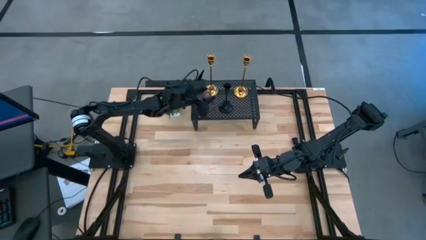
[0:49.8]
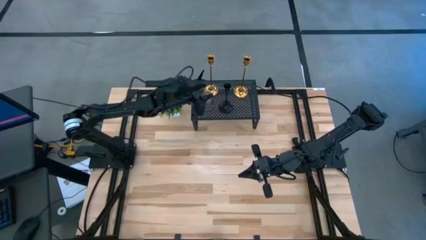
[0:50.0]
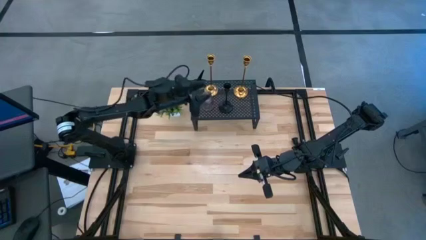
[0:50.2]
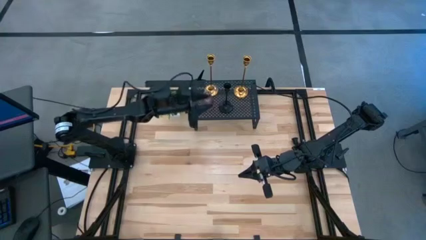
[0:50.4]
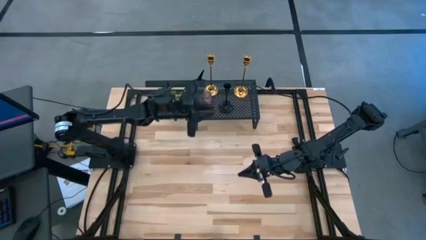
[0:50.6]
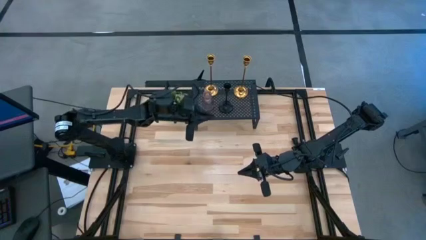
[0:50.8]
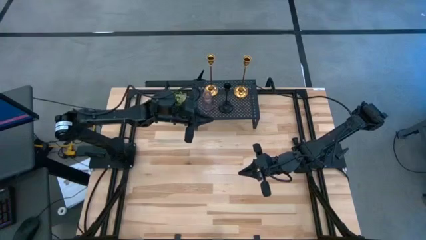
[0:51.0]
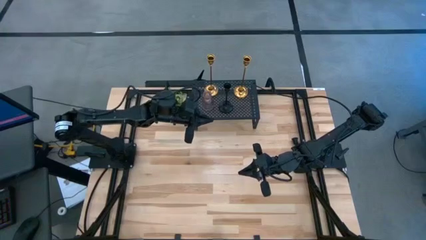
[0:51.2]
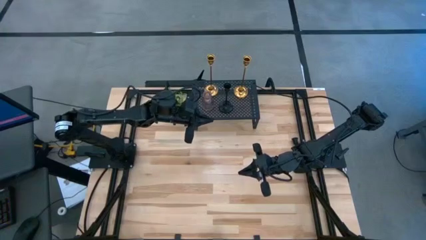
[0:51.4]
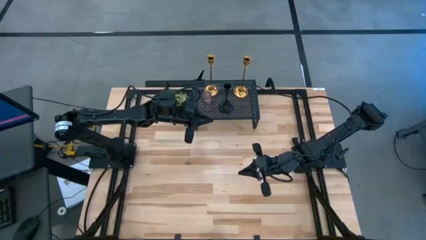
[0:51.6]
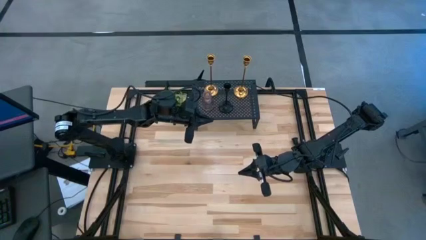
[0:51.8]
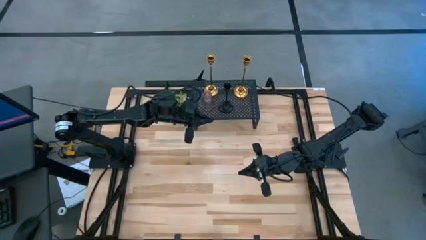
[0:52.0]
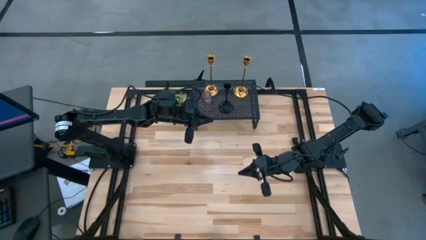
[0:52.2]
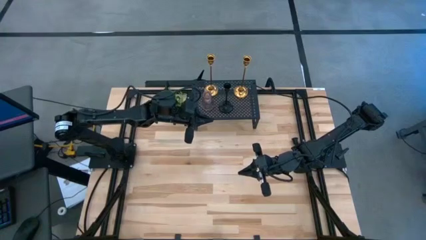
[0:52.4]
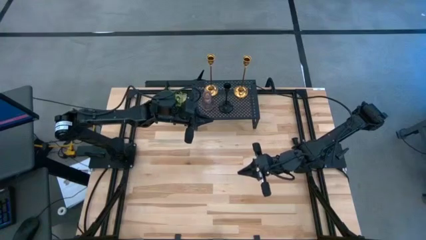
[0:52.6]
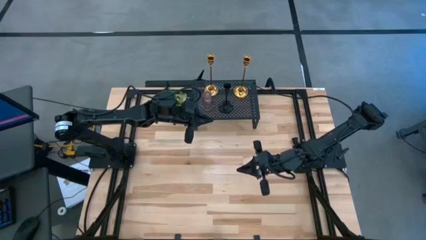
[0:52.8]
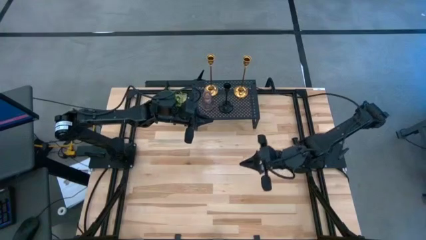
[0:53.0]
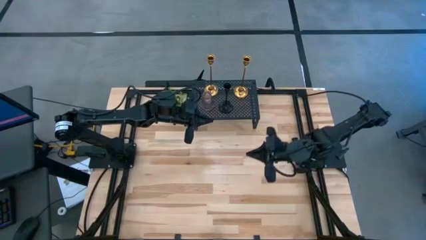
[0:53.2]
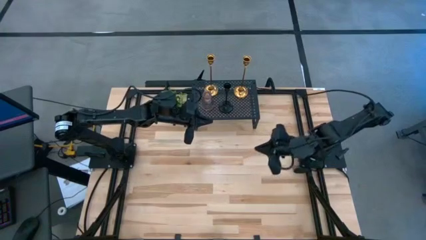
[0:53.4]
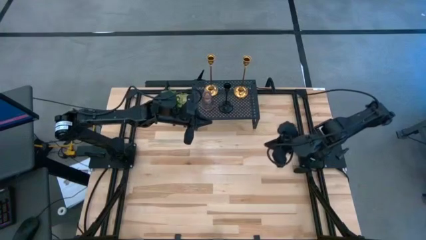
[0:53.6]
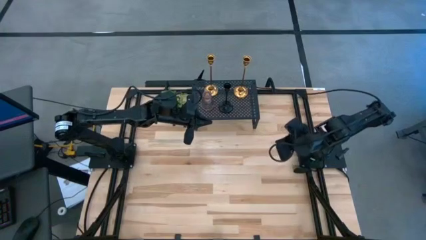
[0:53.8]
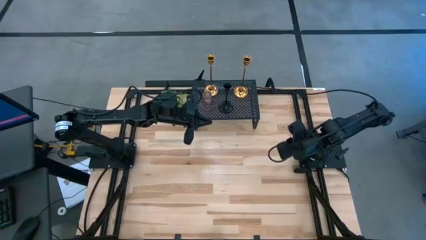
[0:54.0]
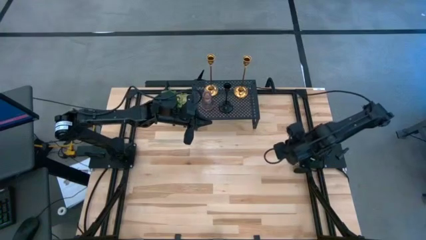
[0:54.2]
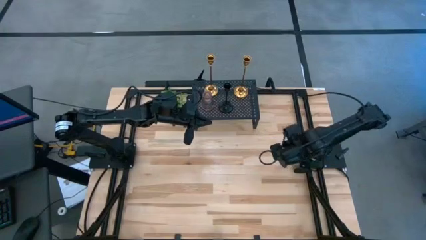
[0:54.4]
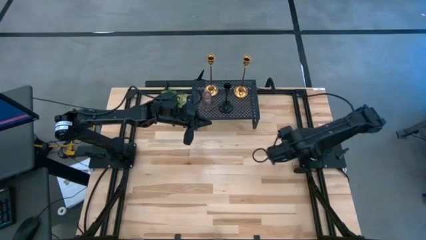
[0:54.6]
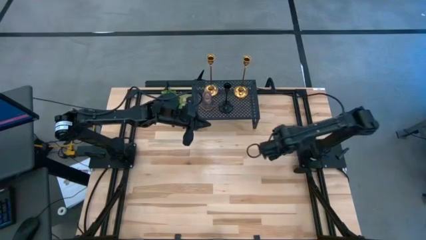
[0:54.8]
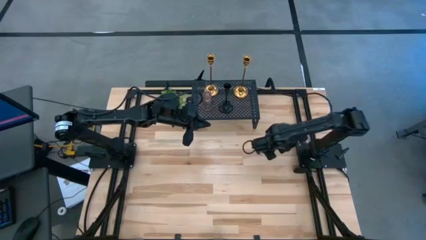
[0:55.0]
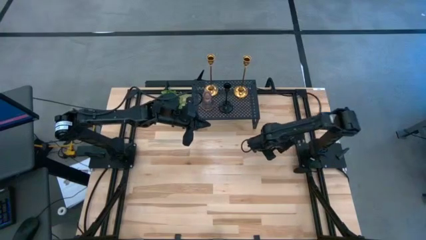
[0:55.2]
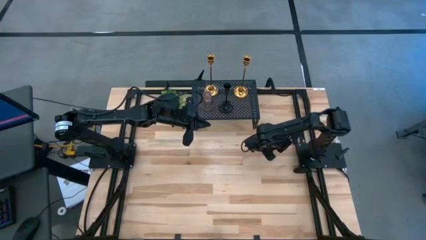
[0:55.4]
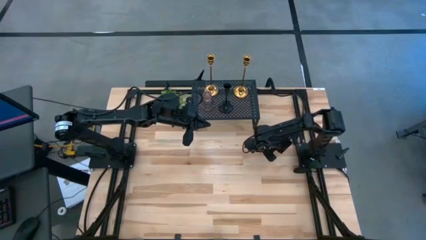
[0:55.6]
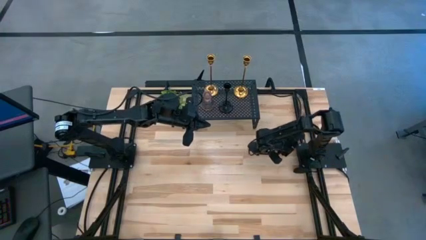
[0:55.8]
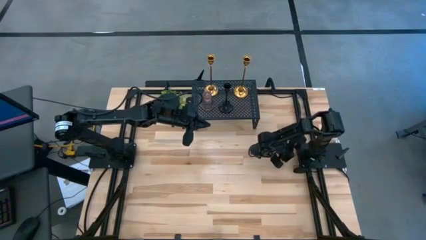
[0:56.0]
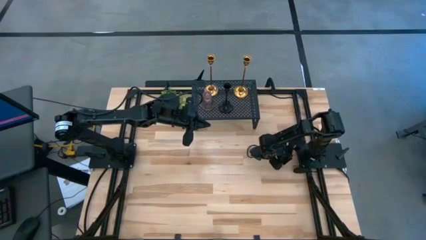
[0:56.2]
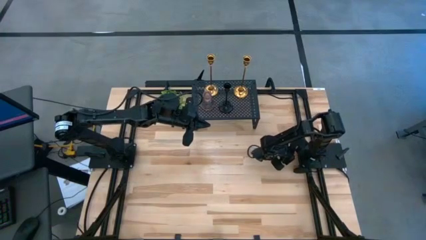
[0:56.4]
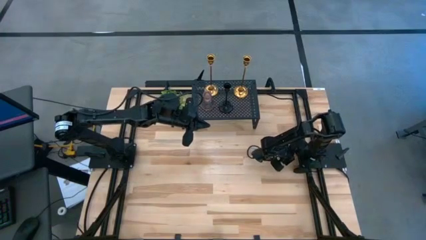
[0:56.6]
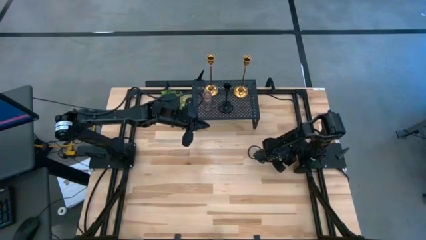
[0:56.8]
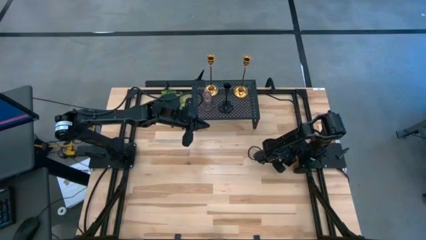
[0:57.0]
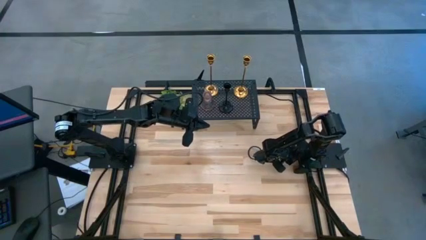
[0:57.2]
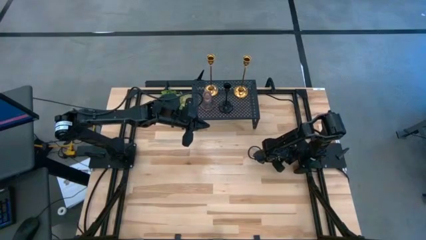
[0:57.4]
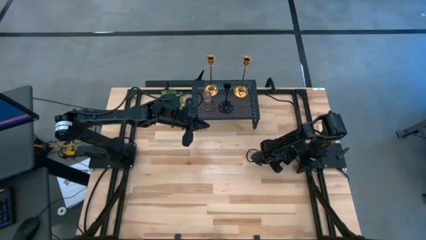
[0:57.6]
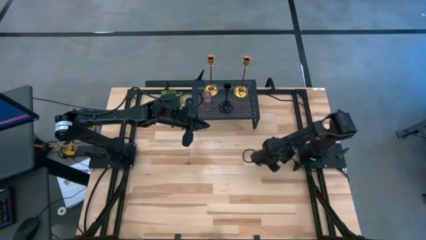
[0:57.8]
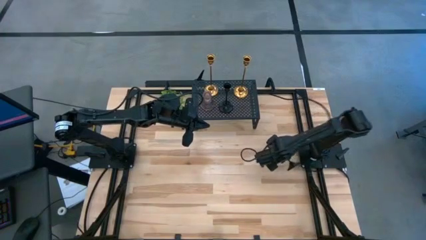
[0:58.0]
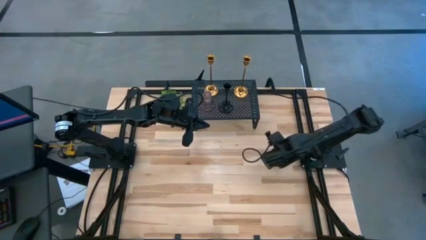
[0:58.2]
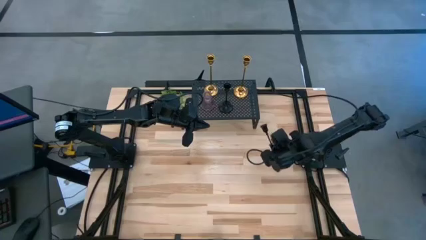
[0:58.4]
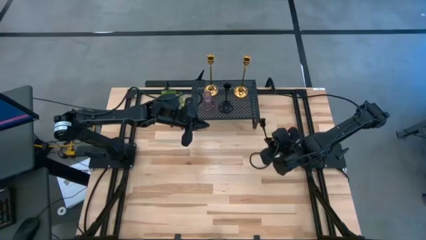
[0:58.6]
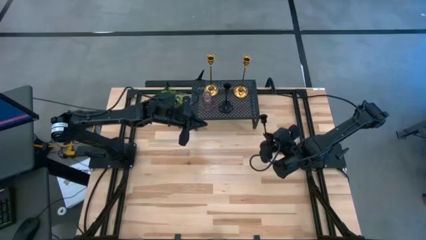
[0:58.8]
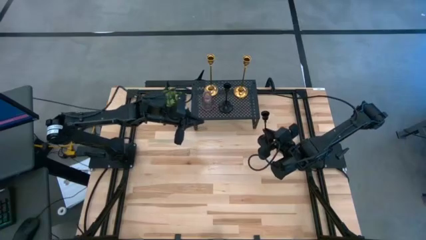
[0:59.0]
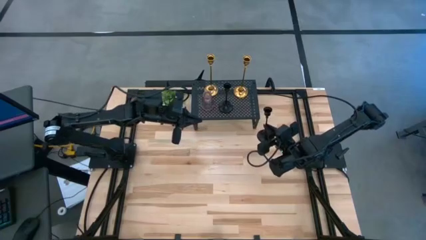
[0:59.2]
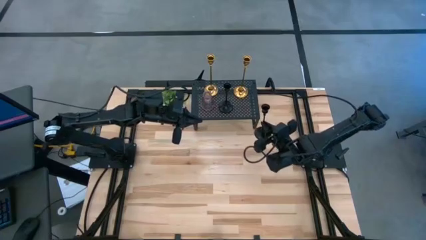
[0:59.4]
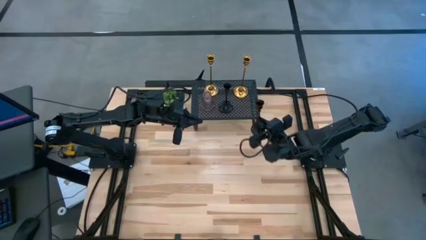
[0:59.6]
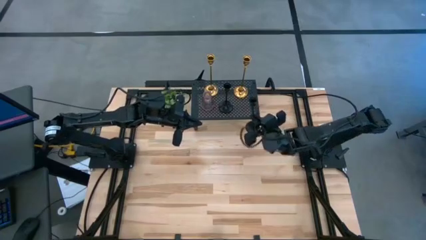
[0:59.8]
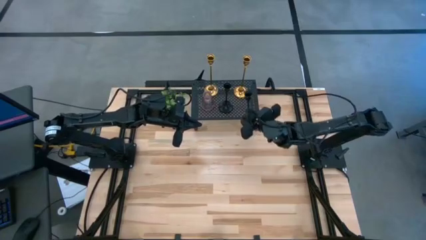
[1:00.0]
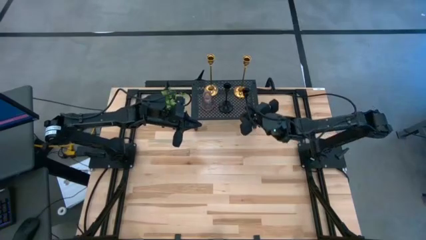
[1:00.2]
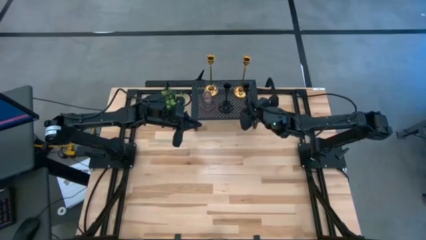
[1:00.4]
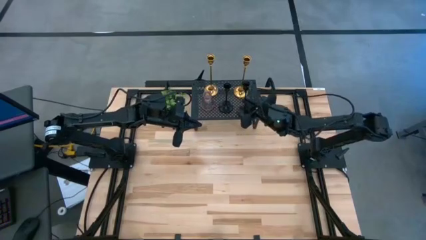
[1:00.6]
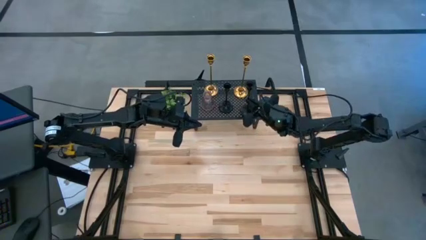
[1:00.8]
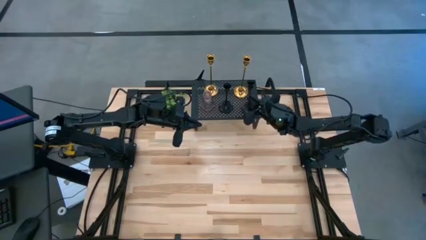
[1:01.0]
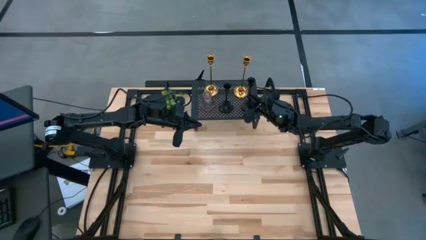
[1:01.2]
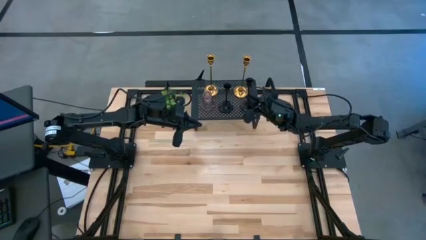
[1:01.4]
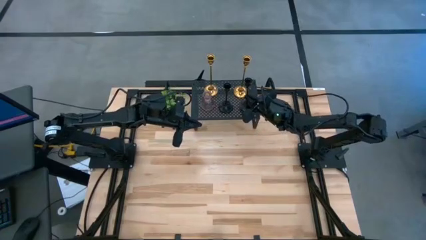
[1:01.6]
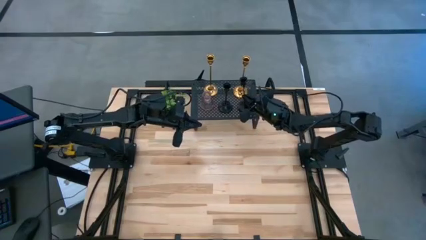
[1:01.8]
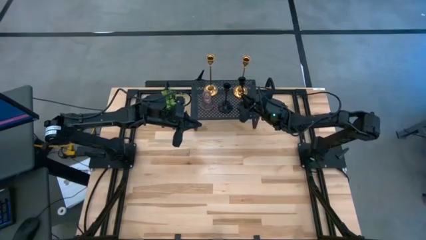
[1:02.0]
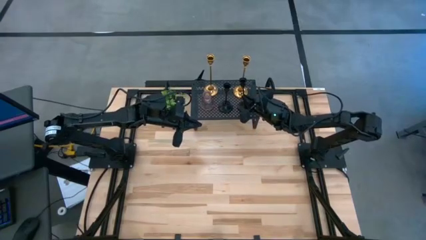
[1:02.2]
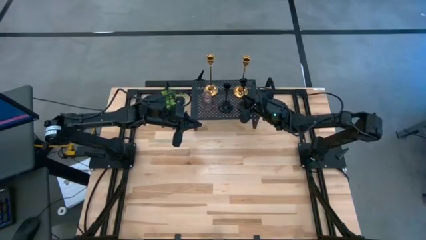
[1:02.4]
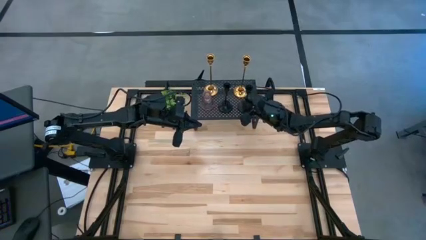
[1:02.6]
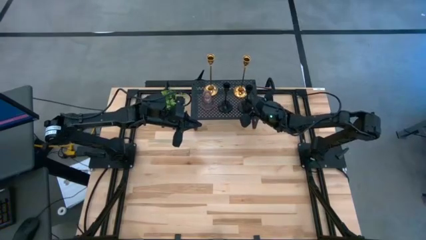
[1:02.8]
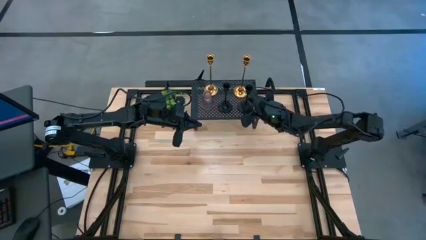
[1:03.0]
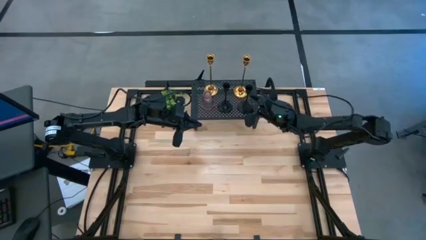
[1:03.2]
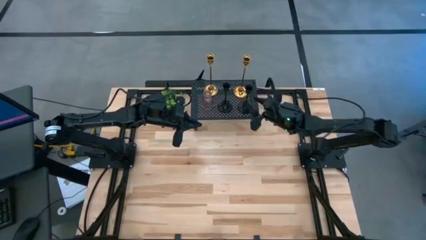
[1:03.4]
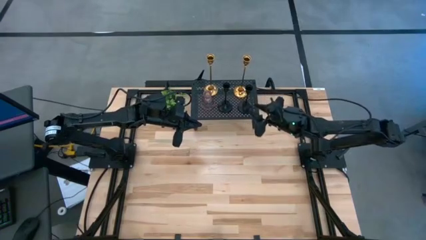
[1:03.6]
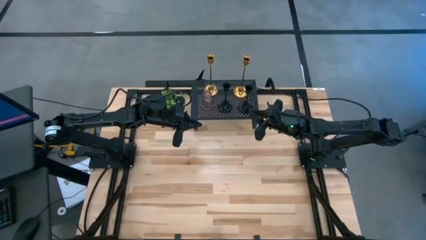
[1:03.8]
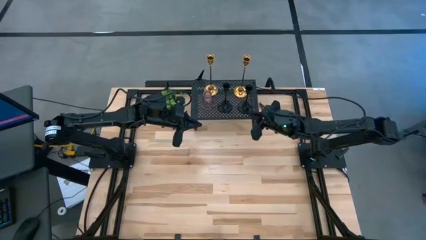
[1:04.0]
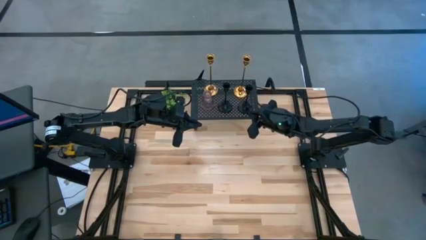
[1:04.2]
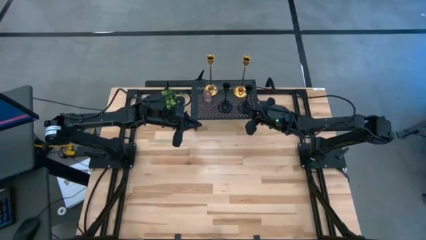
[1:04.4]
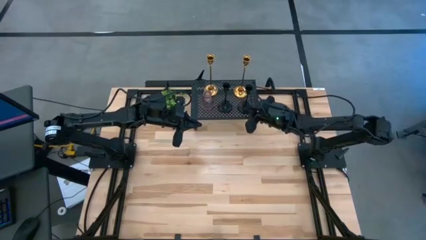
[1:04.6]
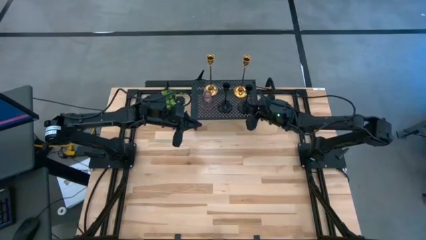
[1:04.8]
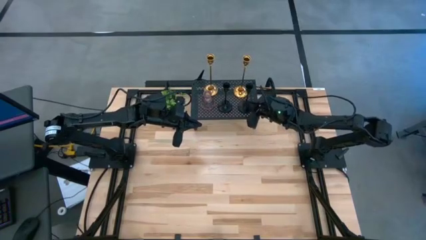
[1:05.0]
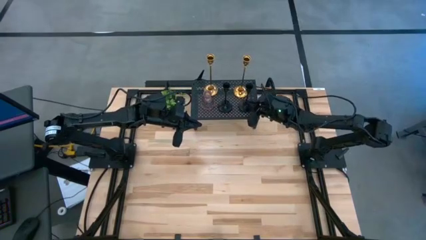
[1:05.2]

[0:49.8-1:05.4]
Task: Pick & Place candle stick holders
Put the black candle holder on the shelf
